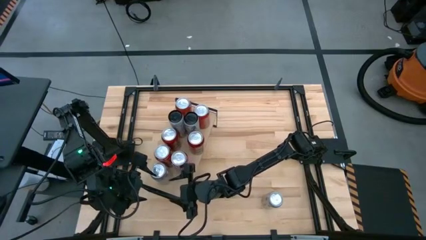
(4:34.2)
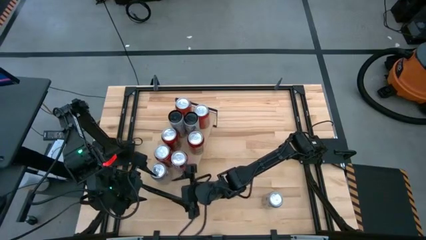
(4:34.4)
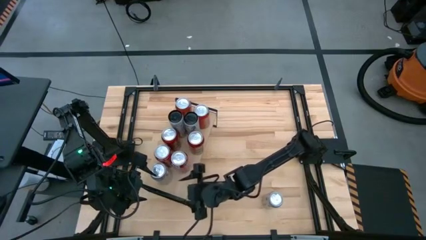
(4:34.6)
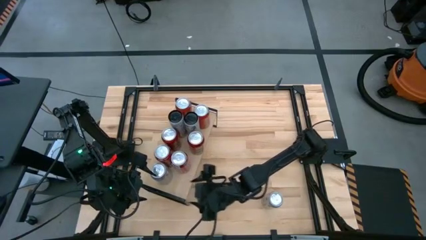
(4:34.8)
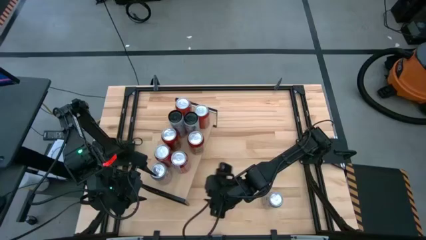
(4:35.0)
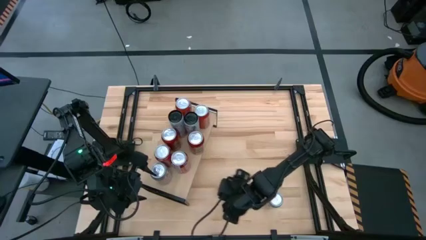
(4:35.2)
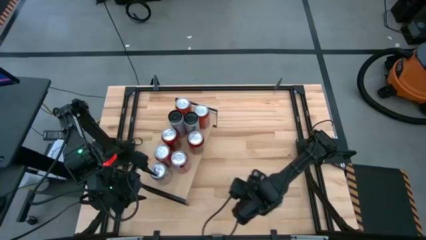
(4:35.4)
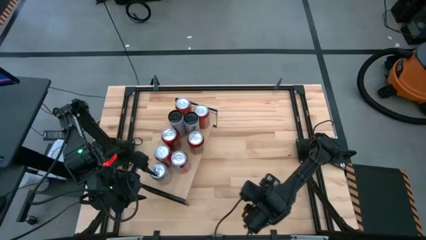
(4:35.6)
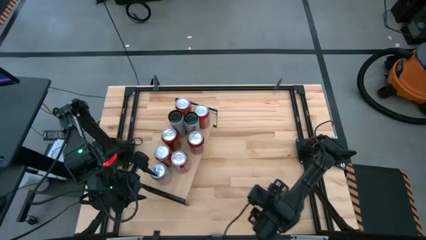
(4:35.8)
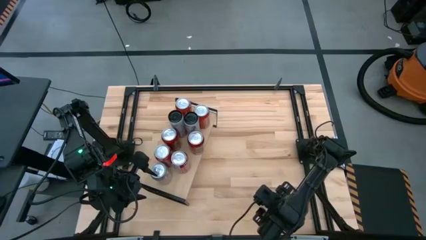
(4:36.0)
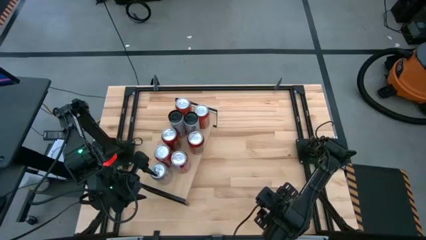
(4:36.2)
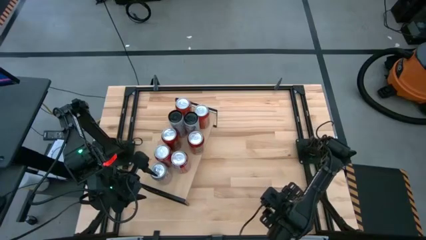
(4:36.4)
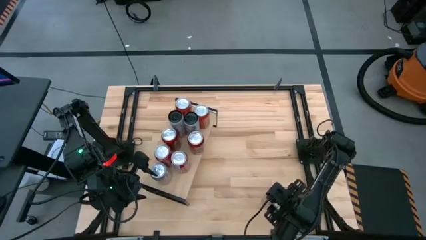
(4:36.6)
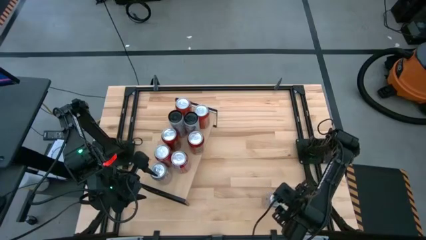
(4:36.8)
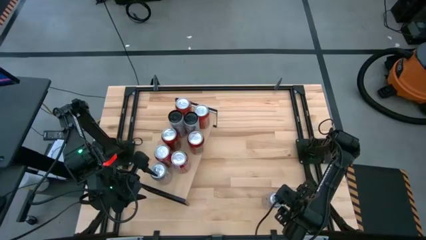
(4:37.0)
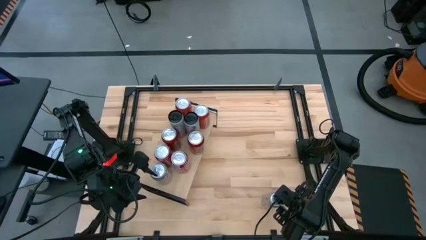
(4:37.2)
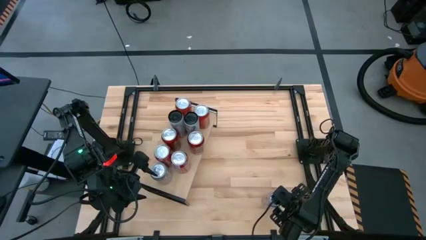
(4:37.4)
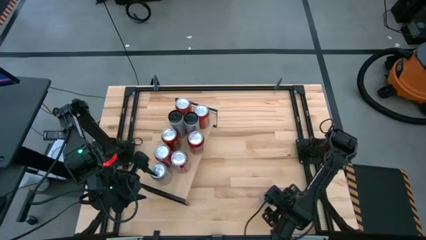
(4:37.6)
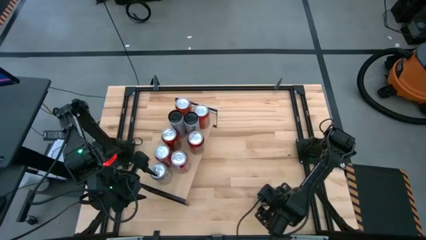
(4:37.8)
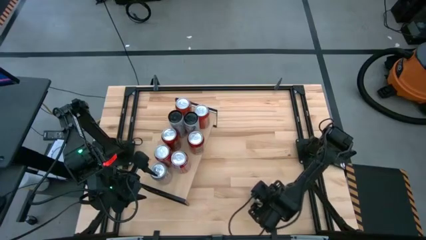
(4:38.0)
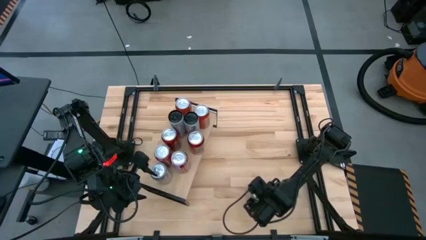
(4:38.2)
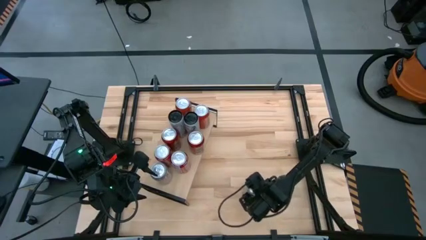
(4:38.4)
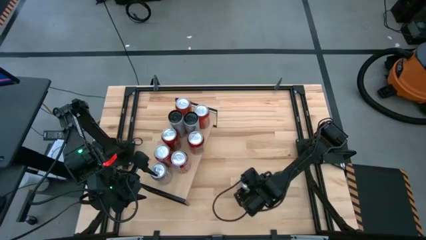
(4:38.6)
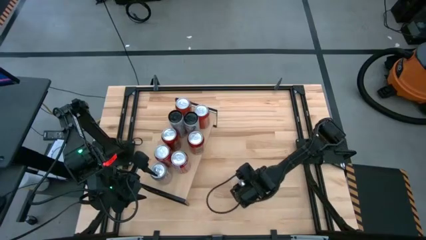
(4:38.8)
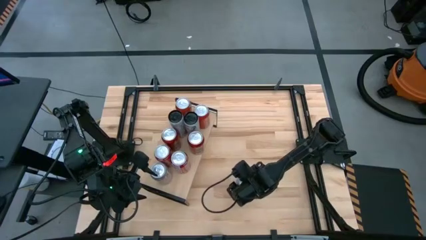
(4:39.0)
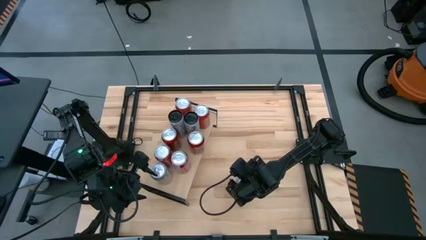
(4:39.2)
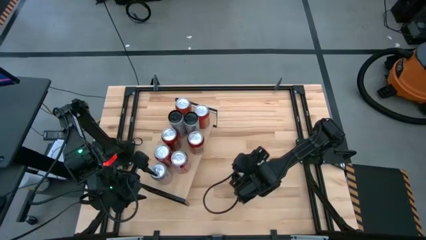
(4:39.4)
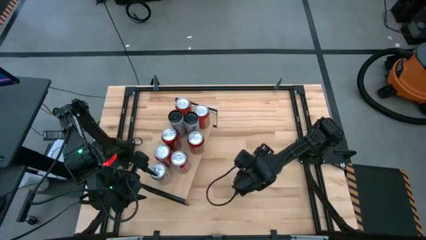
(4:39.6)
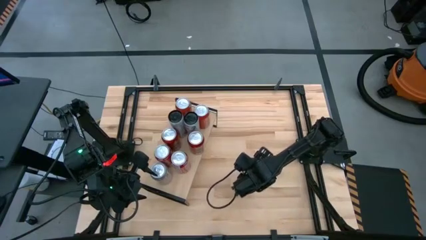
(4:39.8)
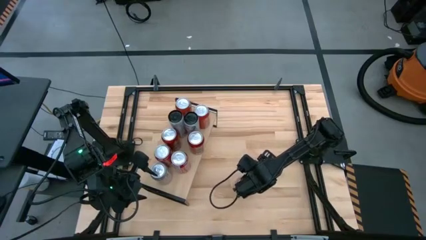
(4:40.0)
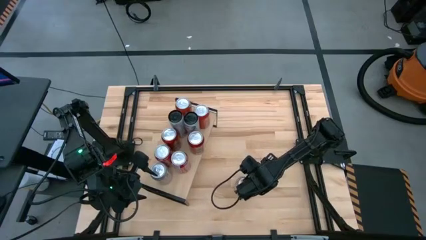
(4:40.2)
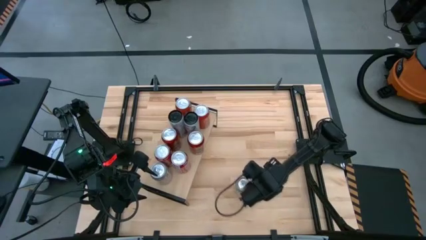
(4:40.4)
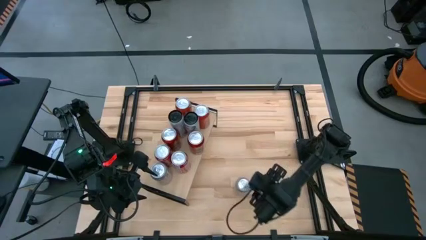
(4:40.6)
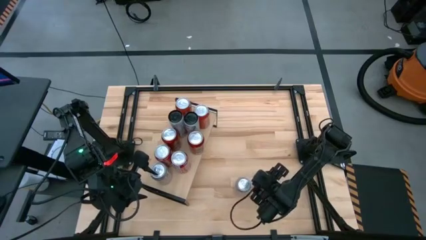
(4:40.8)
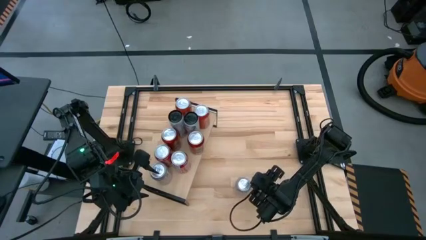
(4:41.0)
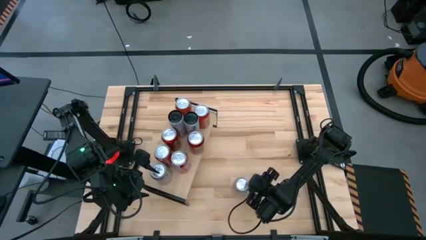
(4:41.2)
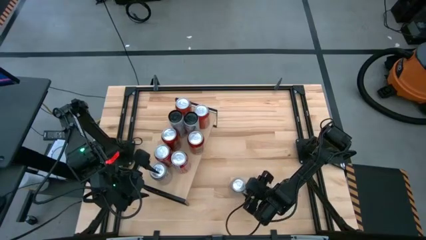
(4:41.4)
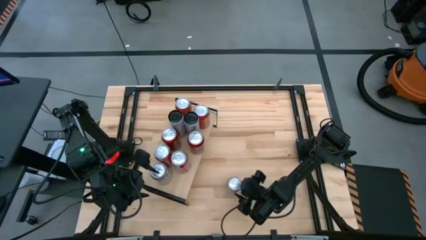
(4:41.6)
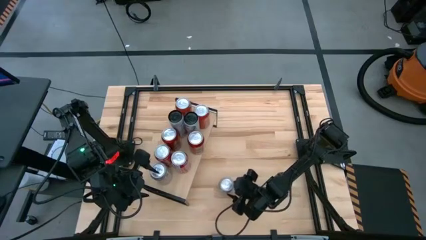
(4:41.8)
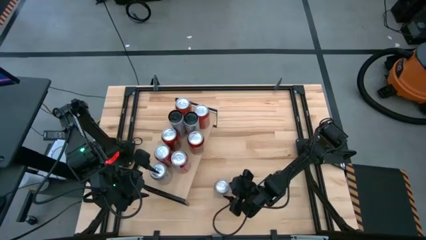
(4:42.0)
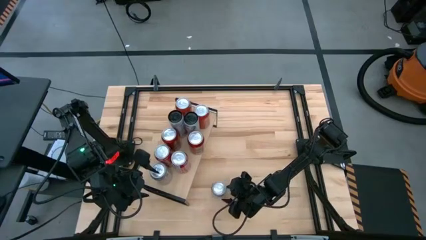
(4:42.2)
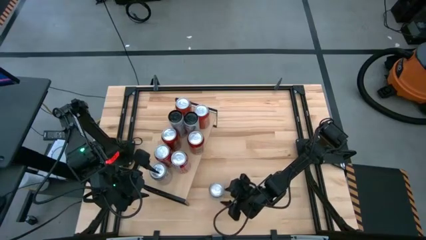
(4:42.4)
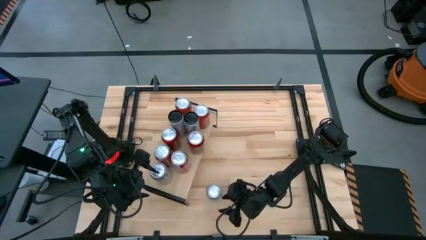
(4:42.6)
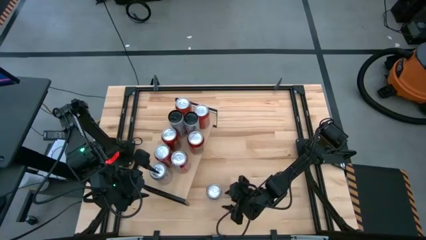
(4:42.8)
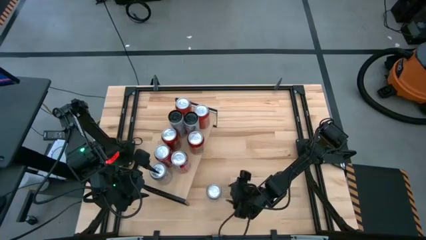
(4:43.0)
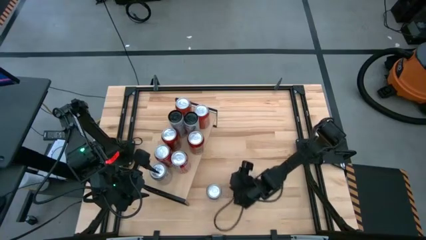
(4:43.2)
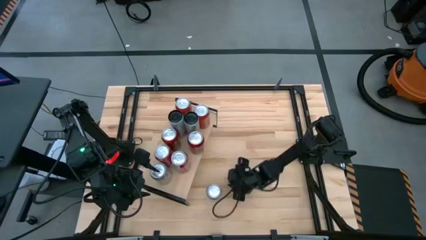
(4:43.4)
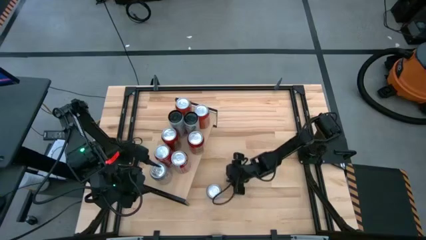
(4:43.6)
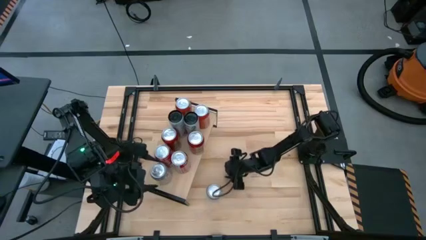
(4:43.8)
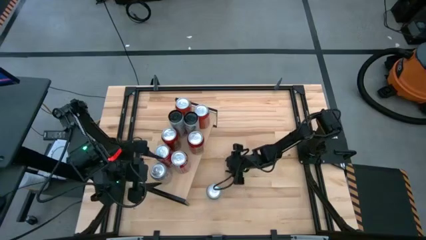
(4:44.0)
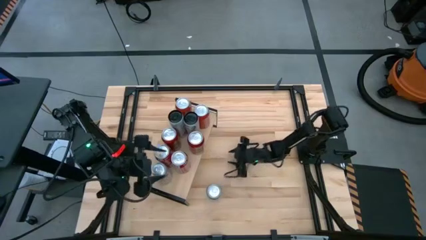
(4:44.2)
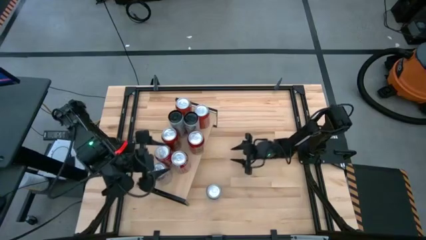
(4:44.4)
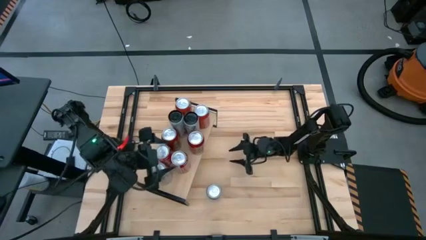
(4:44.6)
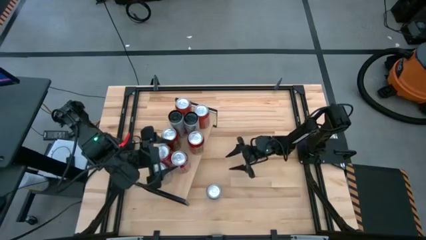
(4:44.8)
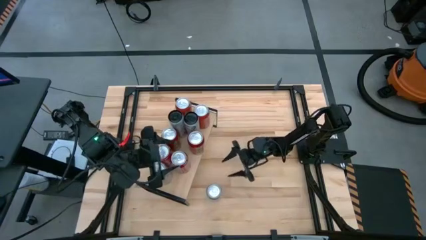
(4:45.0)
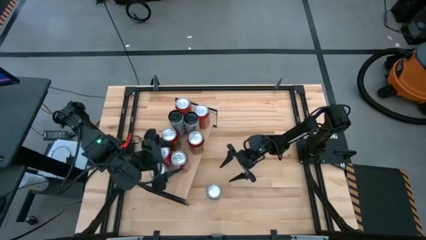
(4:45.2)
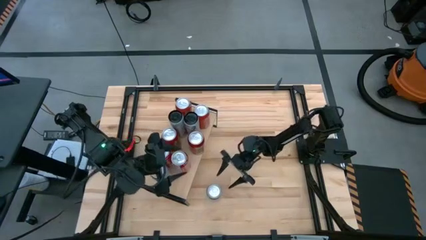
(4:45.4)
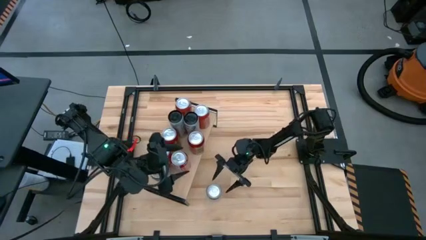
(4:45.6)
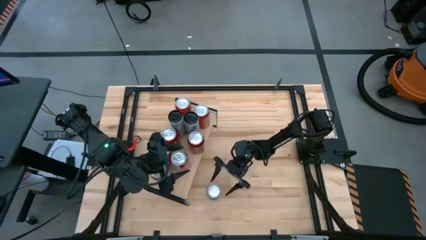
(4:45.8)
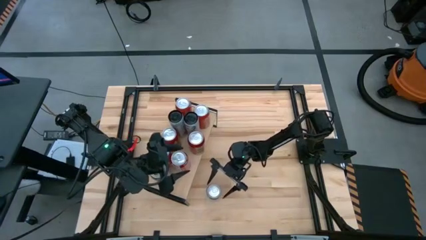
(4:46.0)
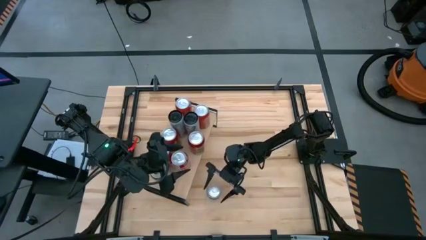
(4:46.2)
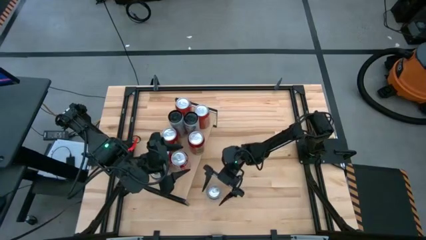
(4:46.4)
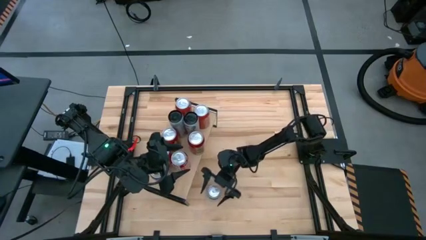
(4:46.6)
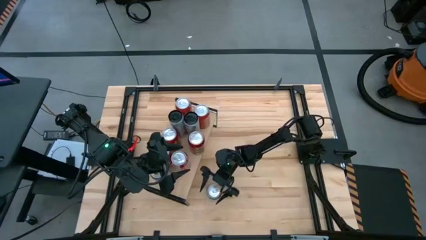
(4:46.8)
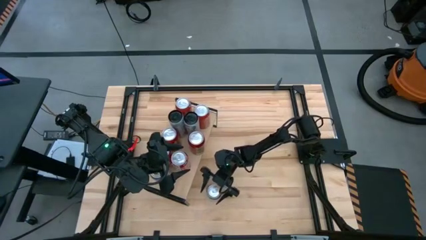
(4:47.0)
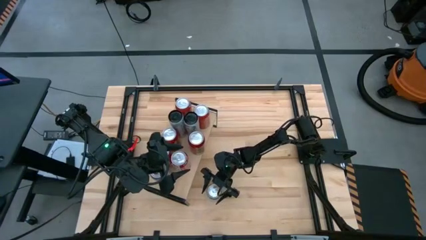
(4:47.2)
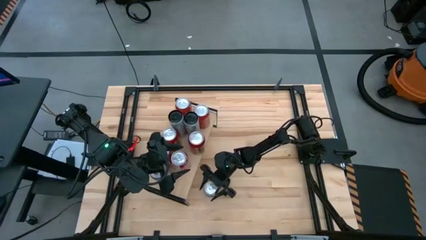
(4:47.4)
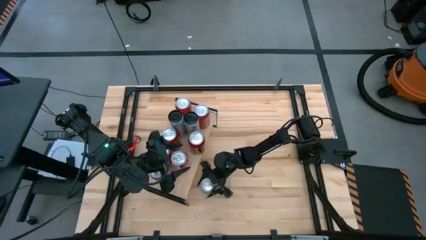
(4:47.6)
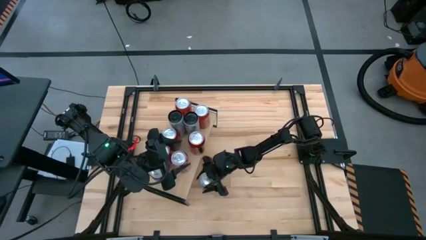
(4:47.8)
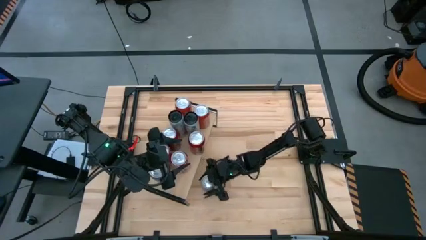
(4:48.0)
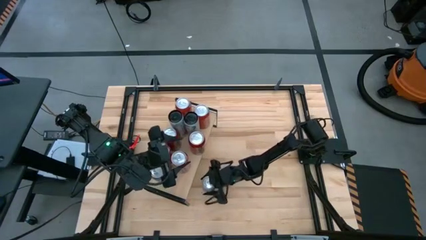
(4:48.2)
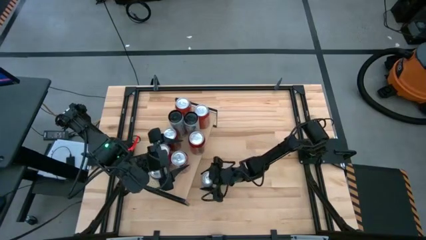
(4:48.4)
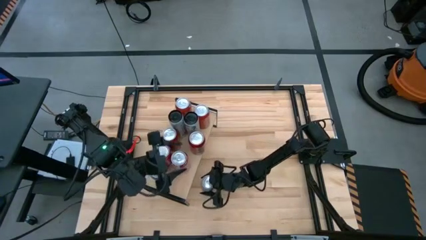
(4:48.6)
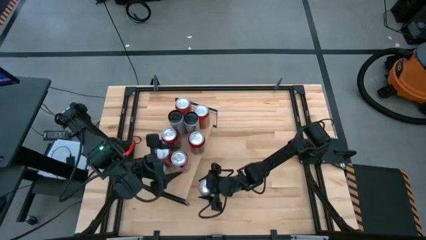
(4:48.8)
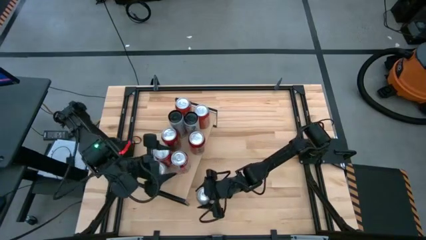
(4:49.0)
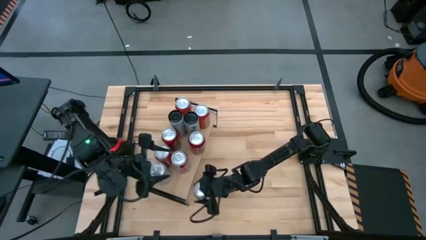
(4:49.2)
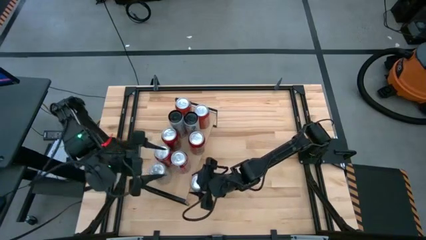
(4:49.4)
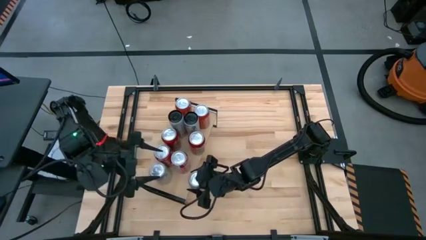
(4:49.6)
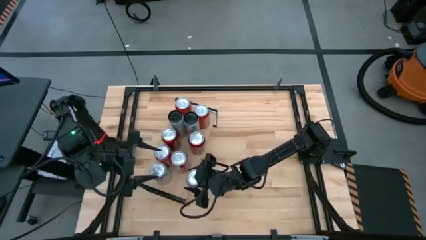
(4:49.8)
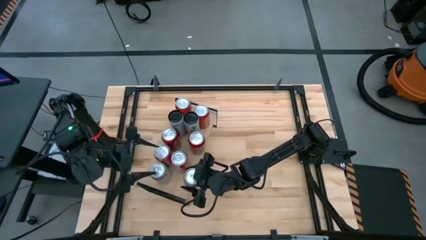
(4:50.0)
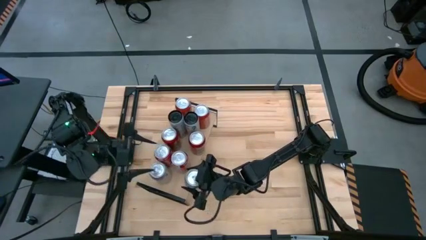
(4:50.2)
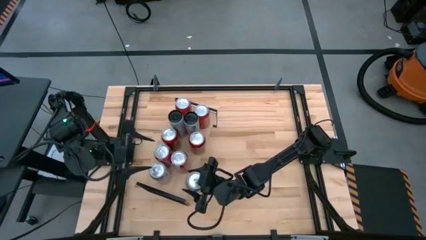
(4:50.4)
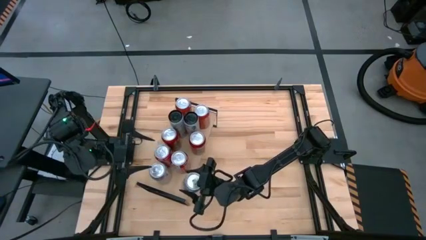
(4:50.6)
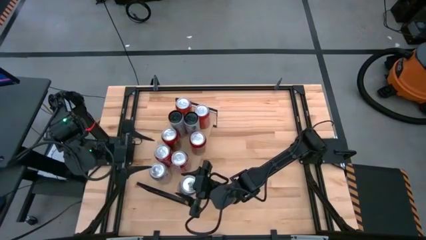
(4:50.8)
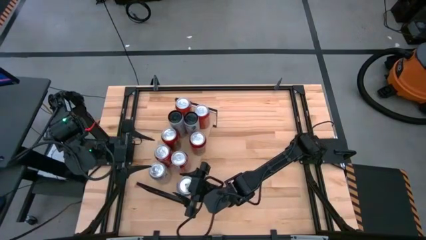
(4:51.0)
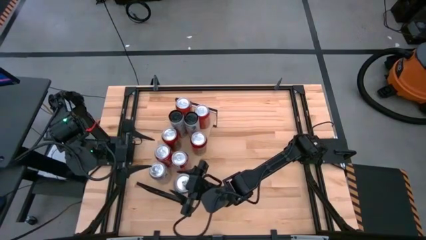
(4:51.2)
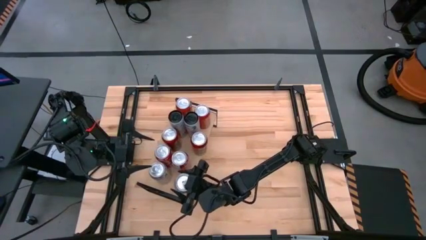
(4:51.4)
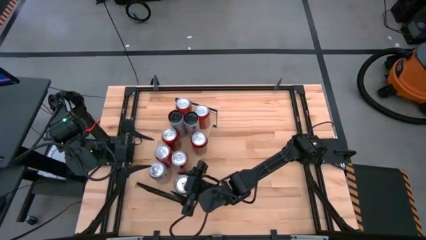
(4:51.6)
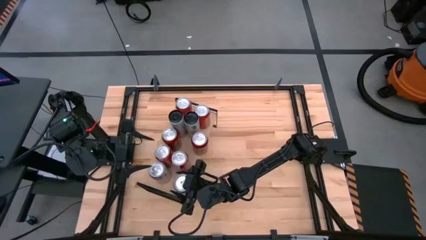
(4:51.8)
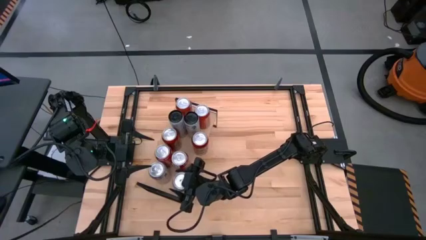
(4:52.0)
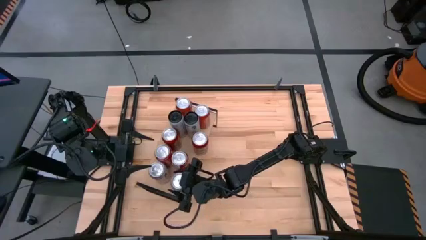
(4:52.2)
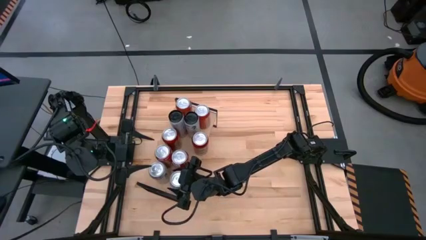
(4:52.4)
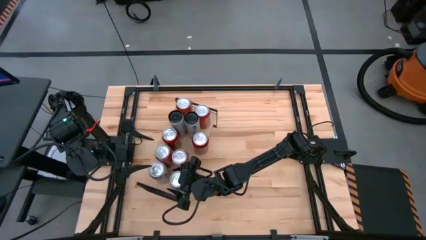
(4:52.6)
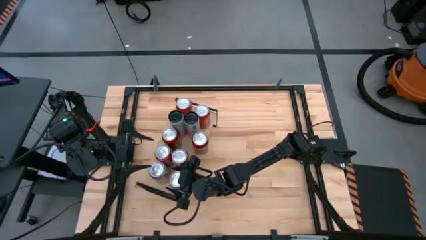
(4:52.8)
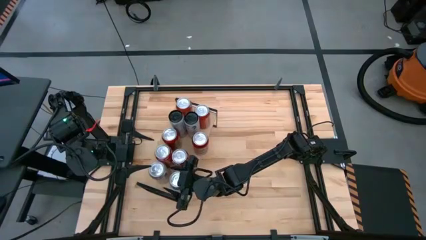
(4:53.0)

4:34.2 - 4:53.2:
Task: Place canned beverage on shelf
Put the silver soda can on the shelf
